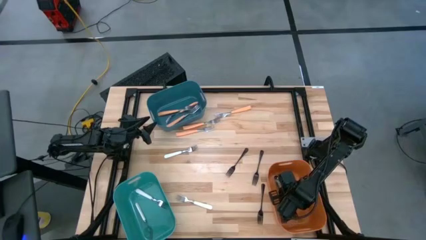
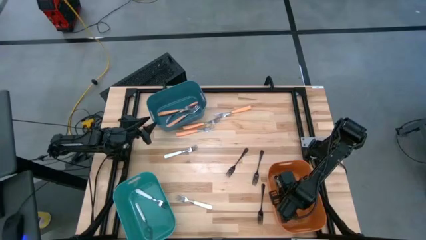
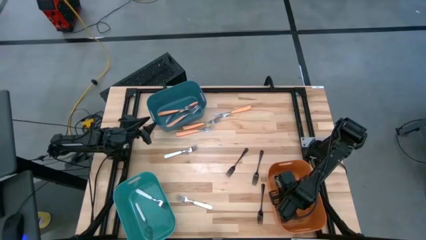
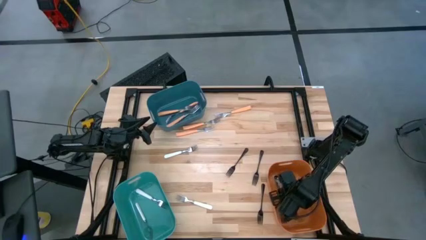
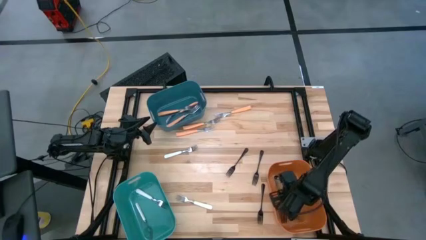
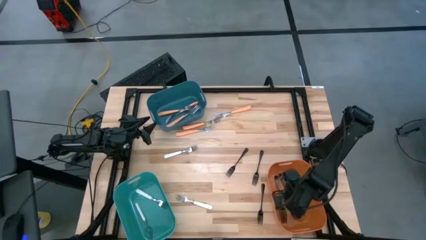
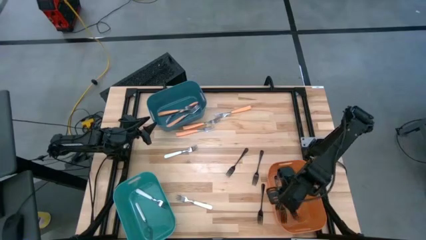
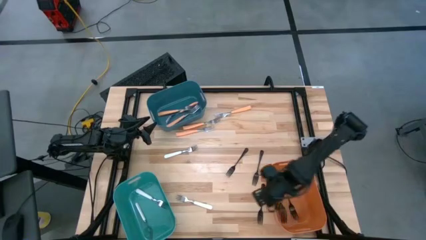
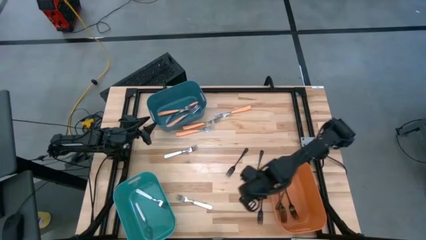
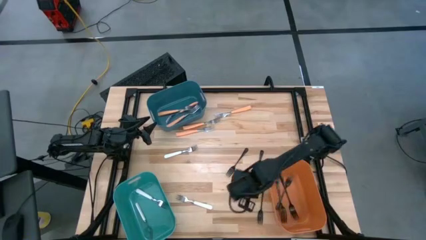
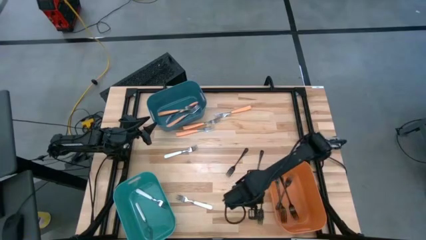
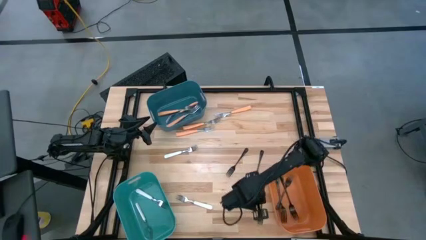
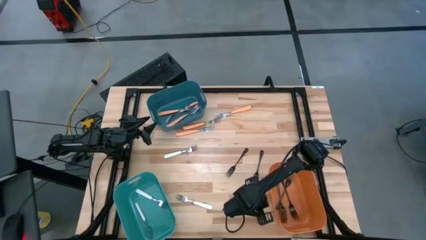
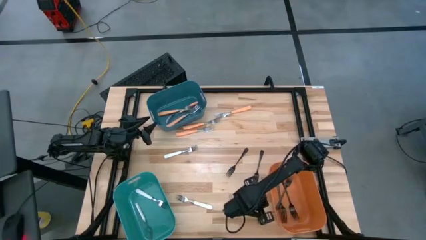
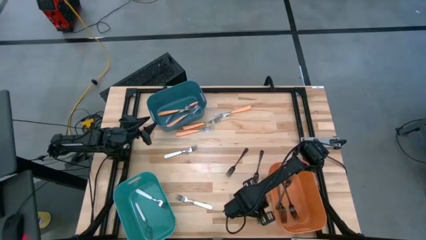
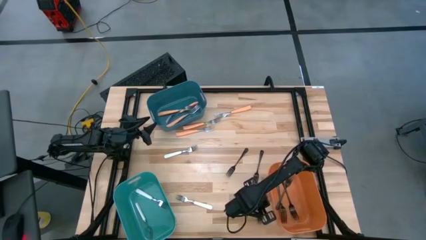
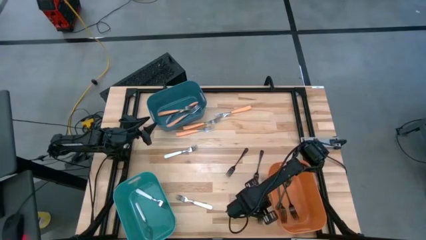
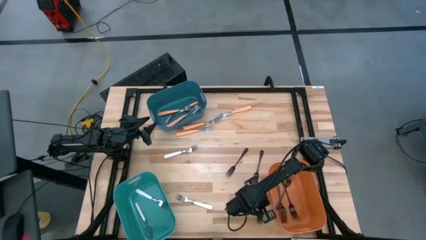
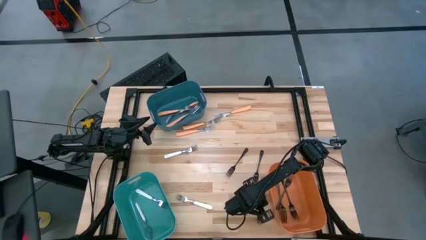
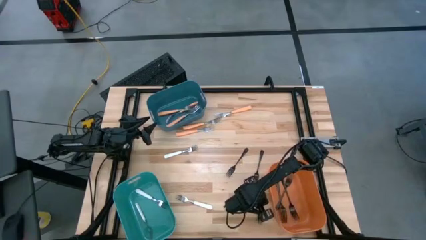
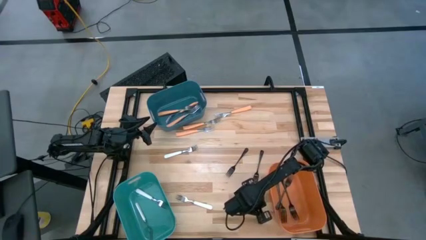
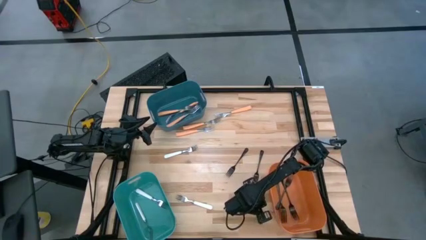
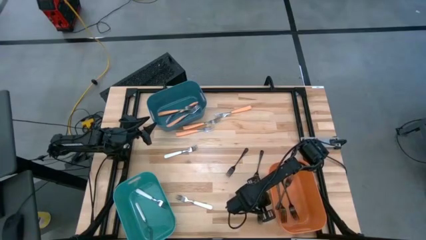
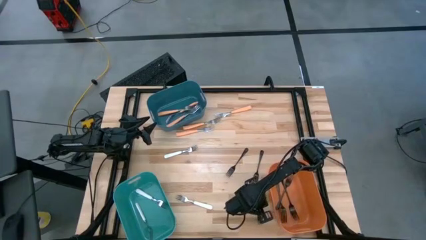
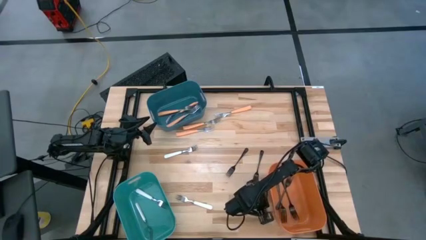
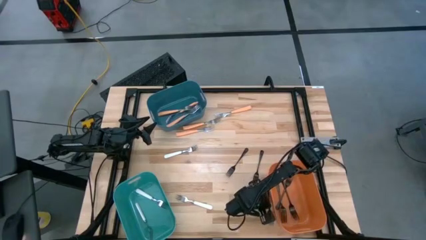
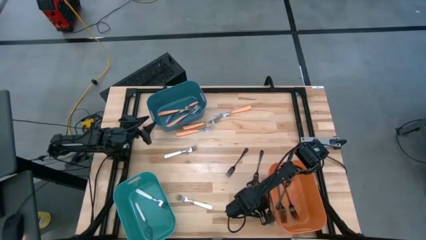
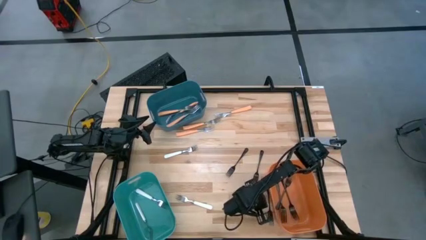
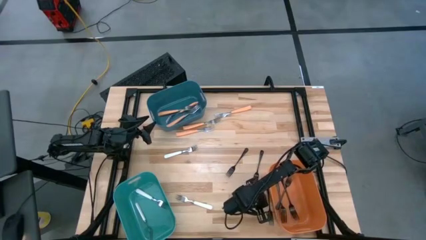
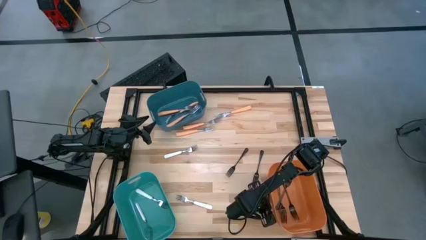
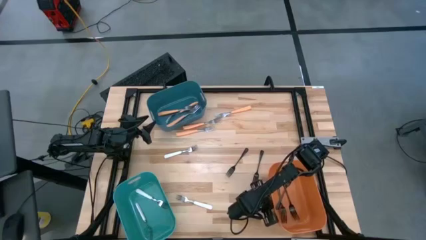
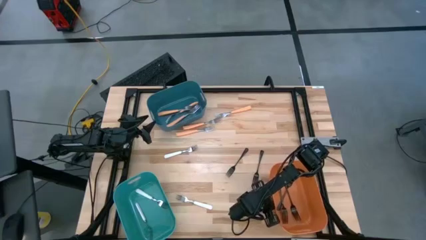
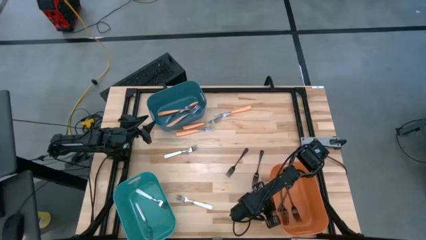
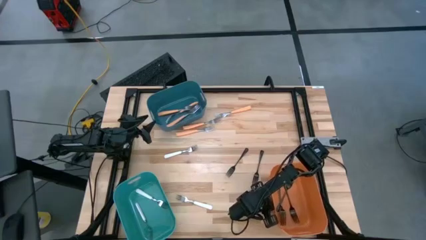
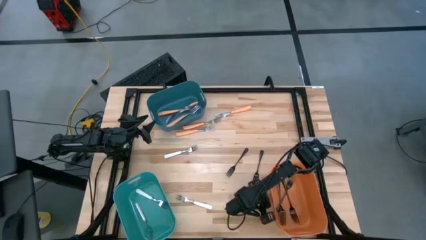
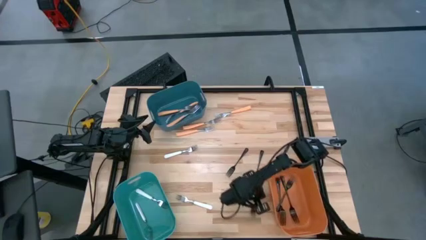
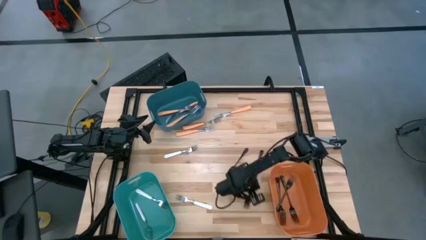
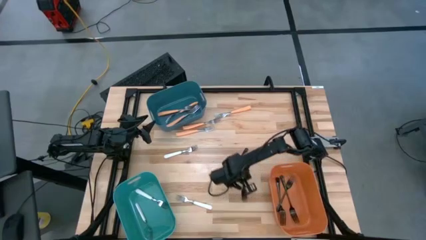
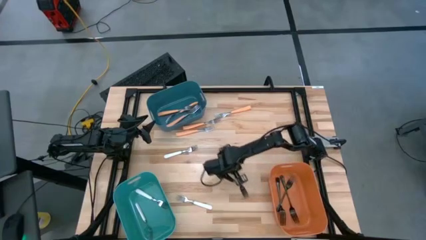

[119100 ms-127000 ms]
Task: Sort silverware by color (type)
Adjust the black fork from the bottom right to the center

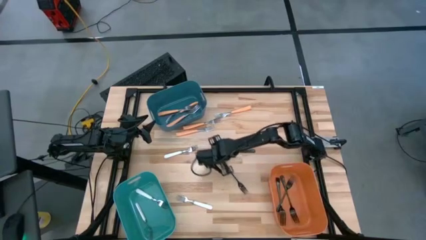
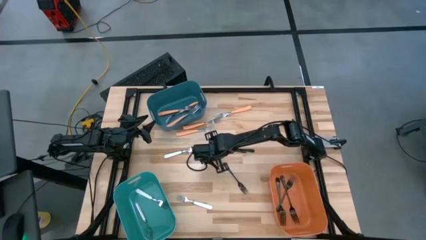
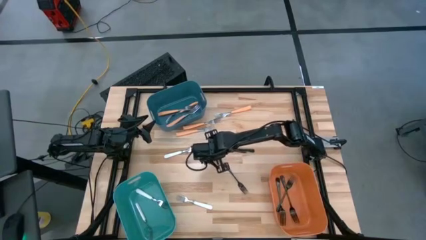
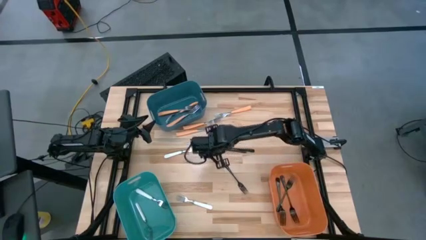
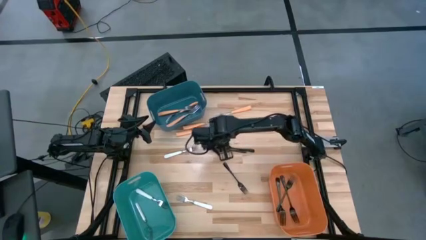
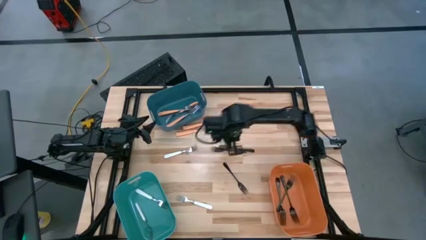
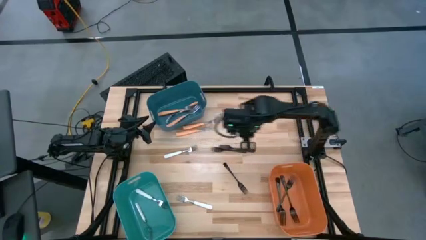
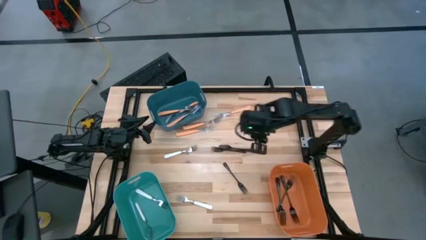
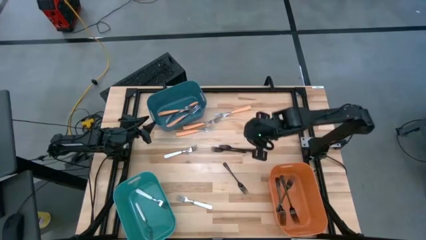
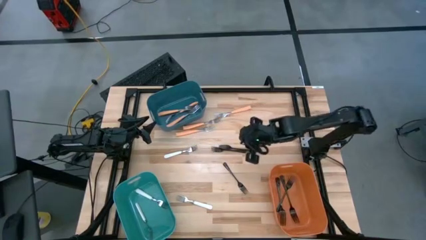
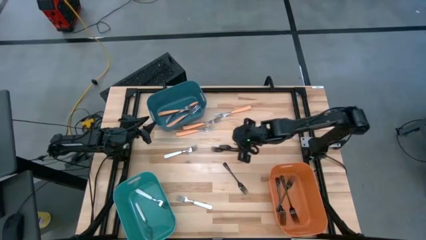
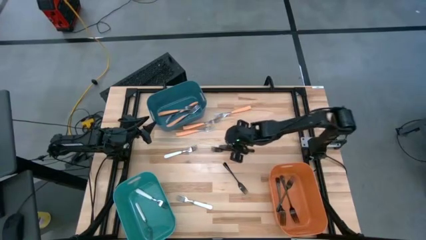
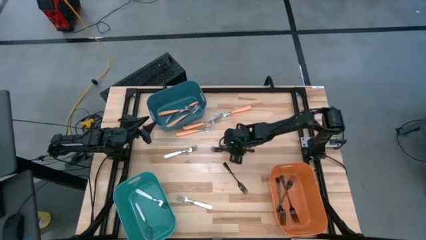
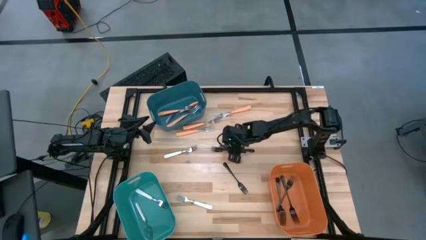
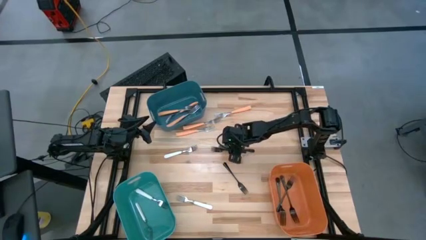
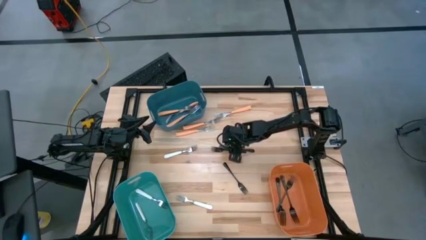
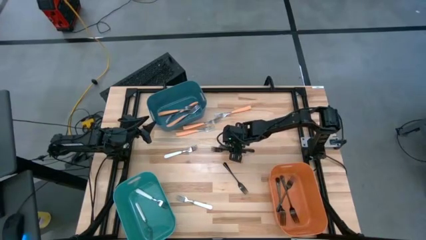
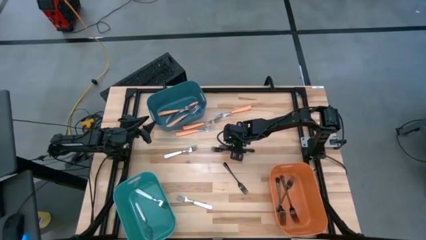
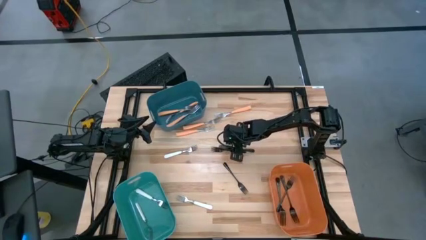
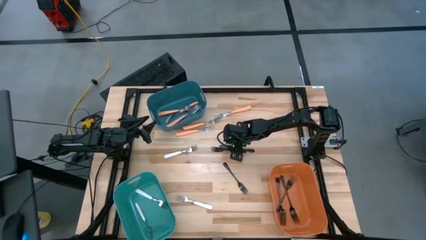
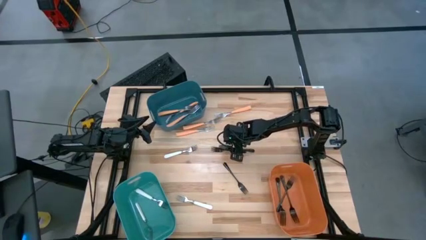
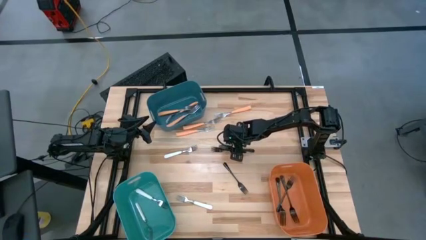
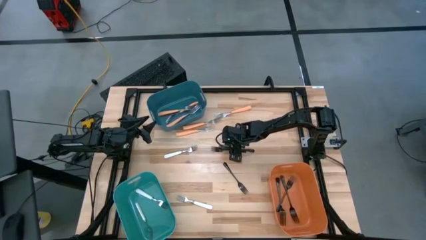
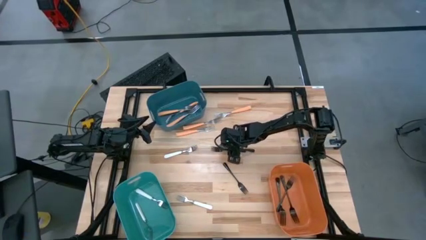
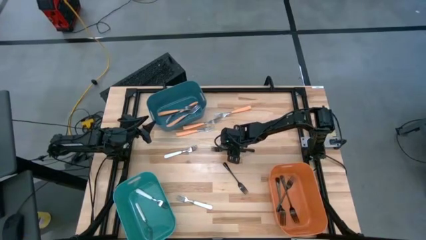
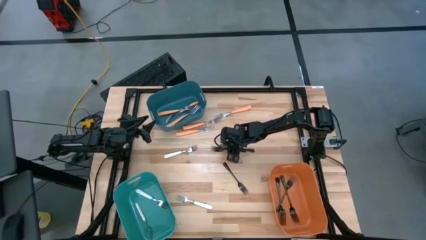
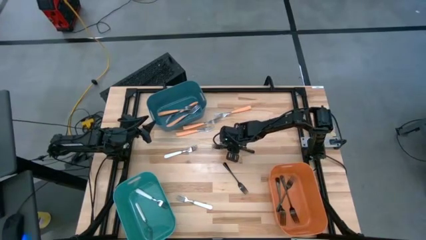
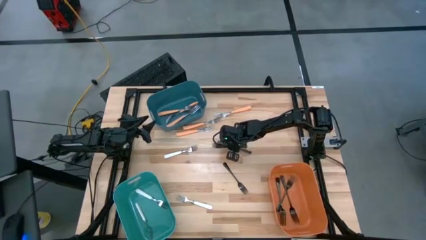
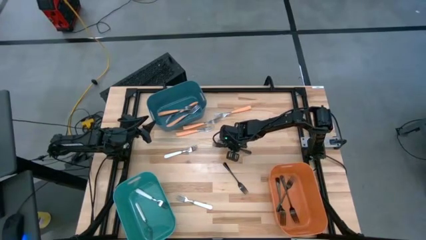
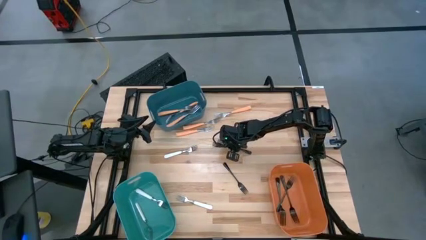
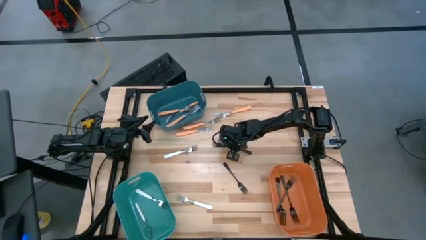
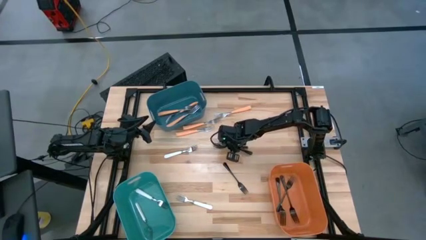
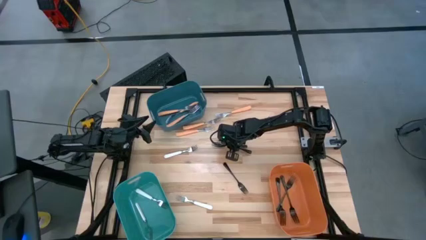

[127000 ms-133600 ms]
Put the black fork into the orange bin
